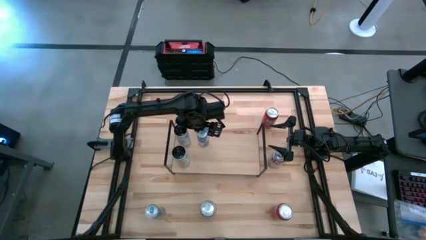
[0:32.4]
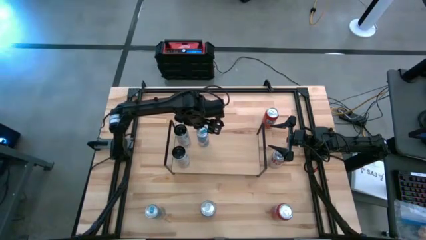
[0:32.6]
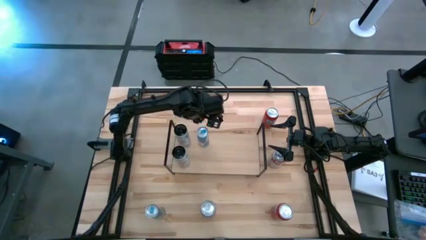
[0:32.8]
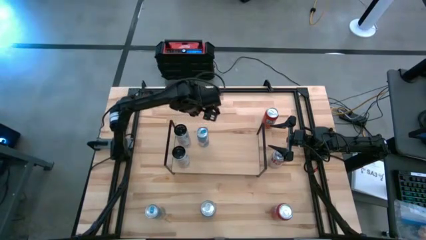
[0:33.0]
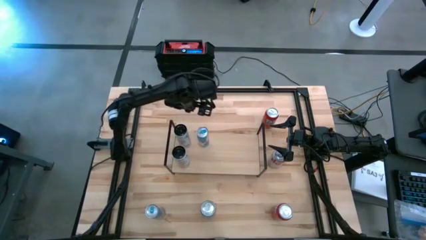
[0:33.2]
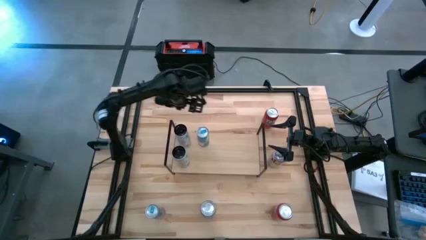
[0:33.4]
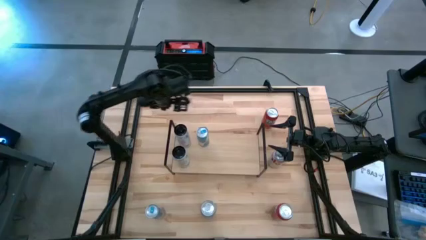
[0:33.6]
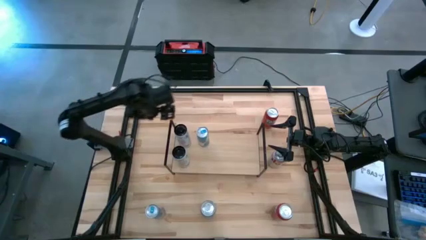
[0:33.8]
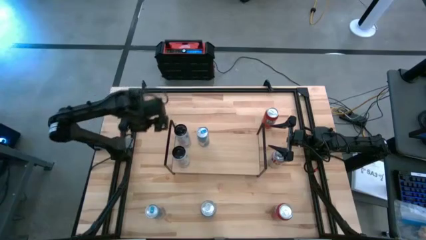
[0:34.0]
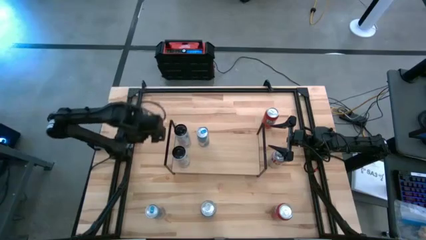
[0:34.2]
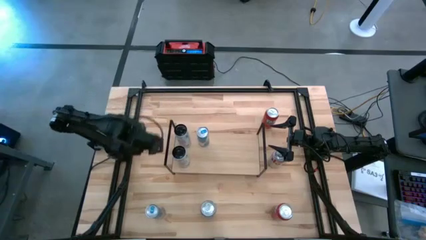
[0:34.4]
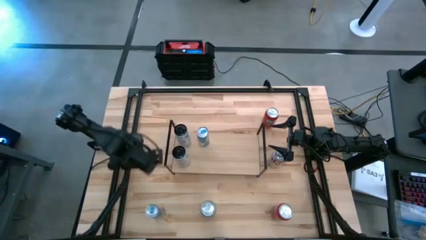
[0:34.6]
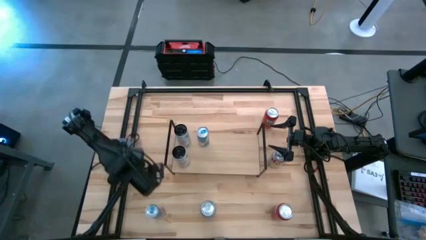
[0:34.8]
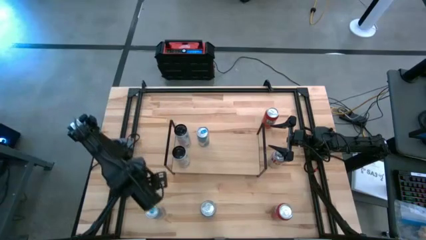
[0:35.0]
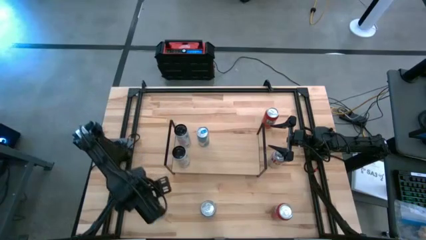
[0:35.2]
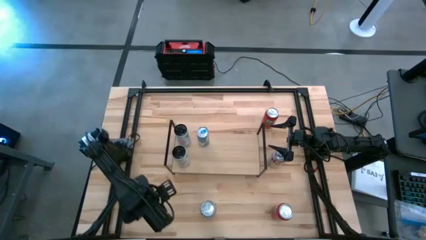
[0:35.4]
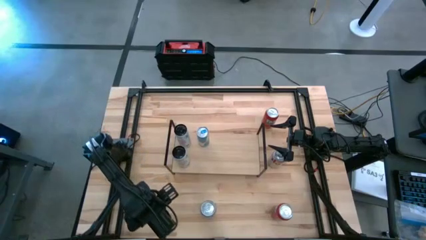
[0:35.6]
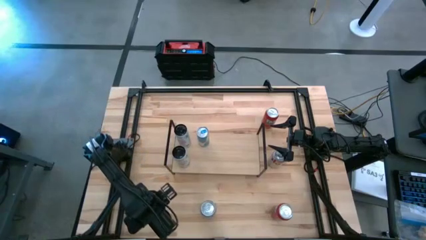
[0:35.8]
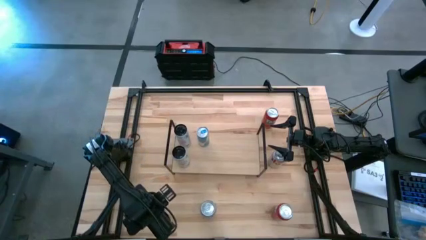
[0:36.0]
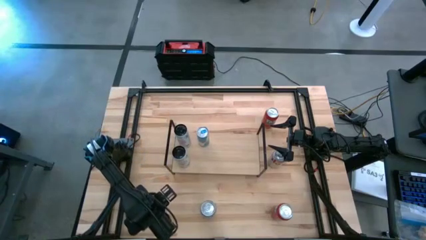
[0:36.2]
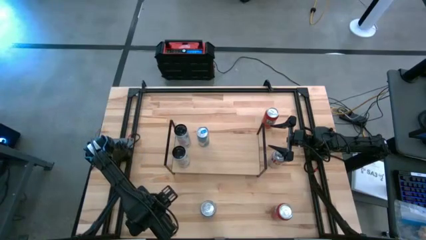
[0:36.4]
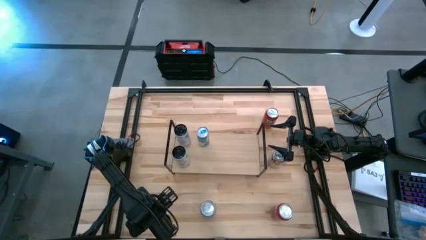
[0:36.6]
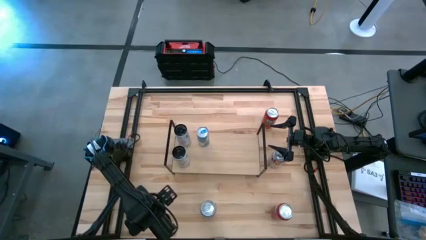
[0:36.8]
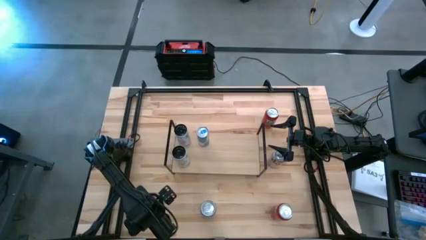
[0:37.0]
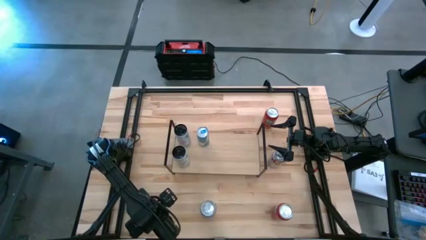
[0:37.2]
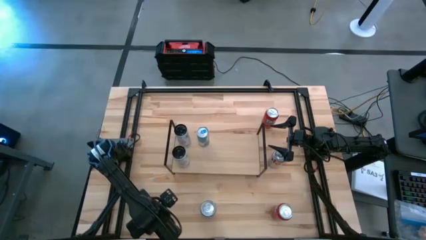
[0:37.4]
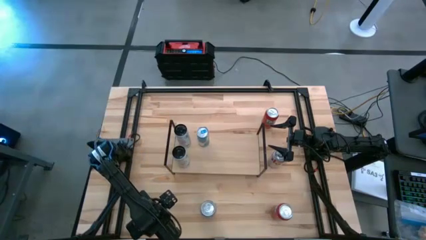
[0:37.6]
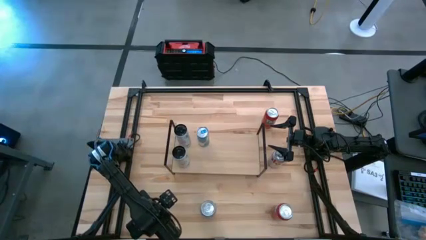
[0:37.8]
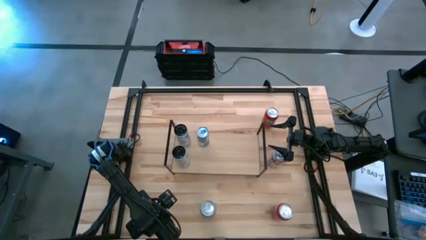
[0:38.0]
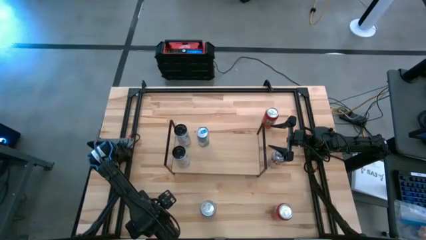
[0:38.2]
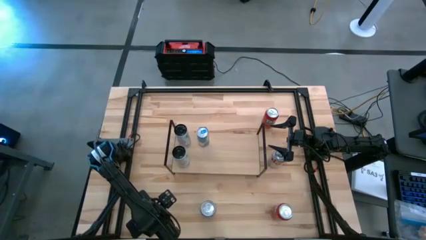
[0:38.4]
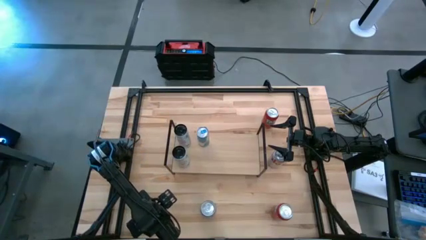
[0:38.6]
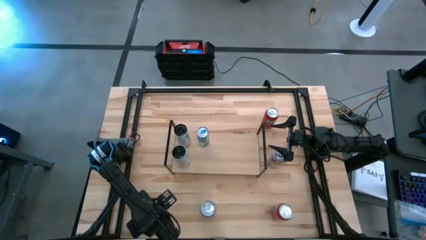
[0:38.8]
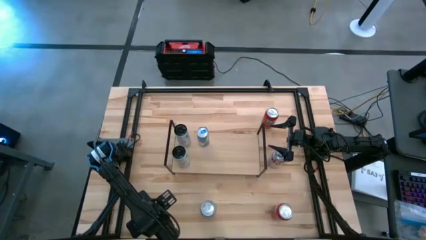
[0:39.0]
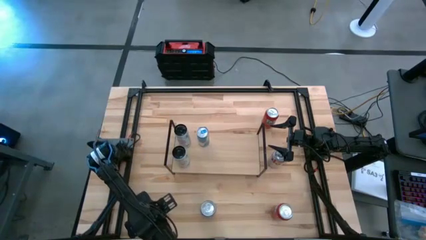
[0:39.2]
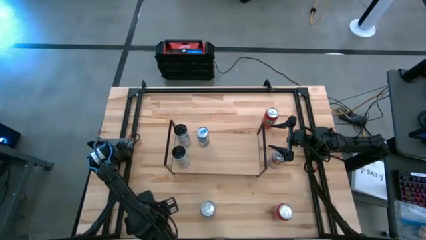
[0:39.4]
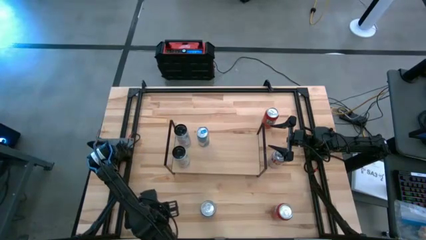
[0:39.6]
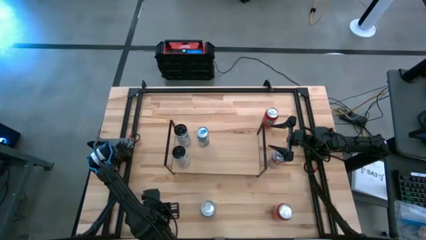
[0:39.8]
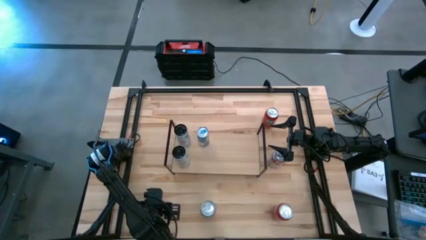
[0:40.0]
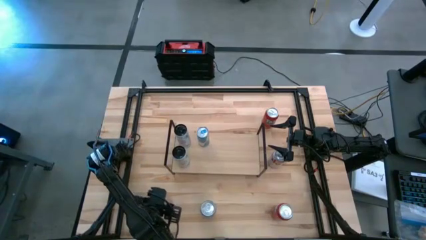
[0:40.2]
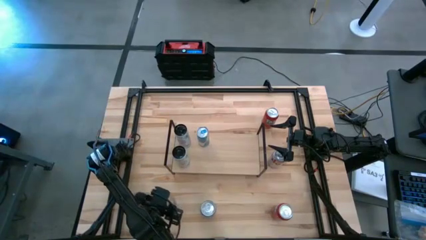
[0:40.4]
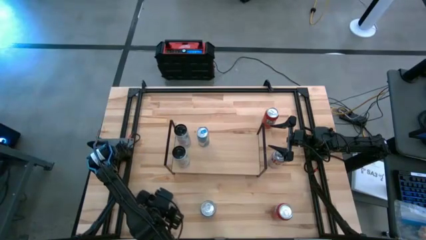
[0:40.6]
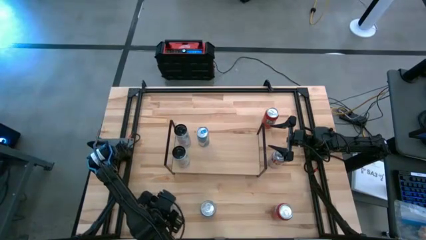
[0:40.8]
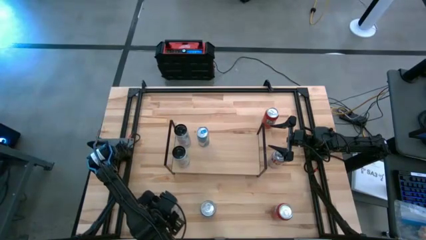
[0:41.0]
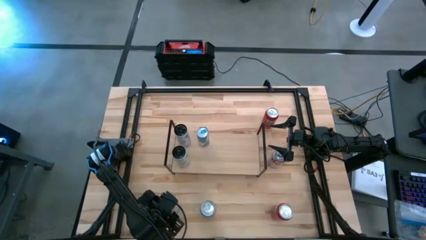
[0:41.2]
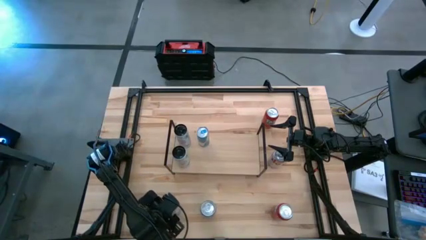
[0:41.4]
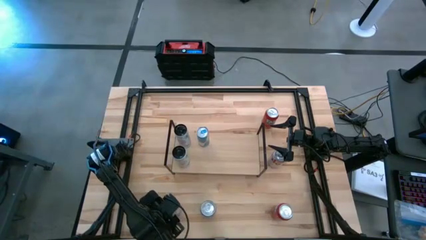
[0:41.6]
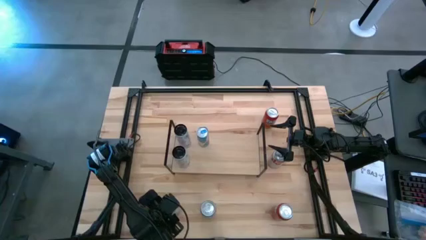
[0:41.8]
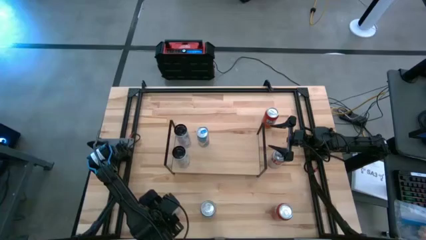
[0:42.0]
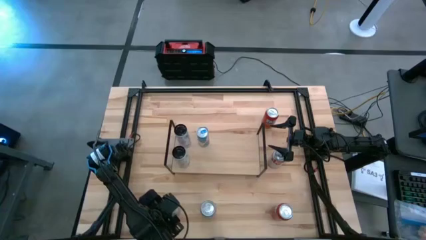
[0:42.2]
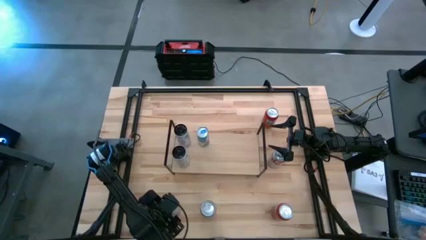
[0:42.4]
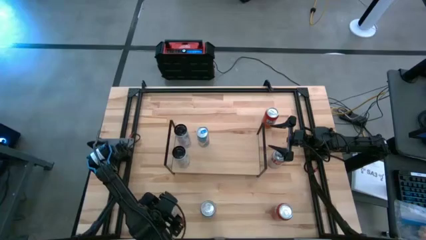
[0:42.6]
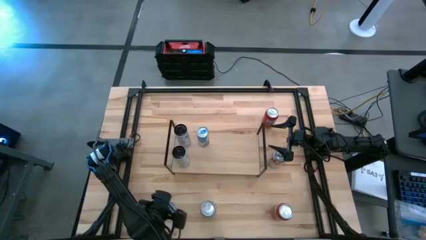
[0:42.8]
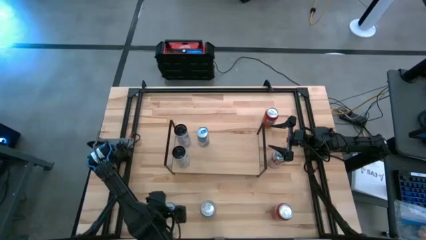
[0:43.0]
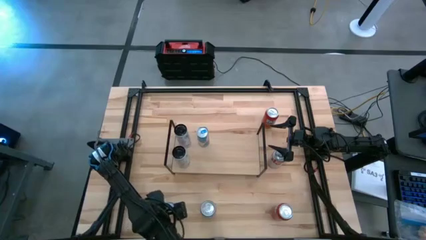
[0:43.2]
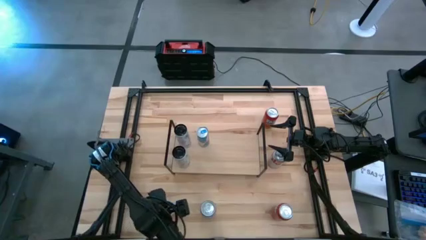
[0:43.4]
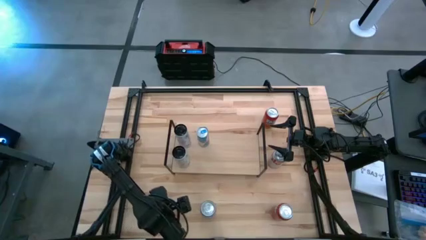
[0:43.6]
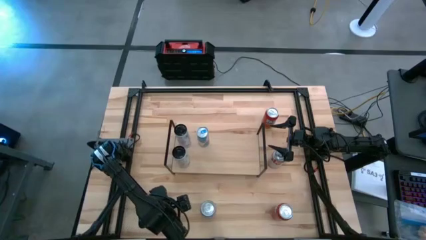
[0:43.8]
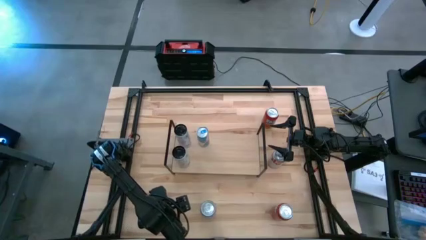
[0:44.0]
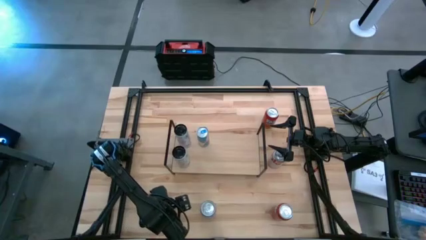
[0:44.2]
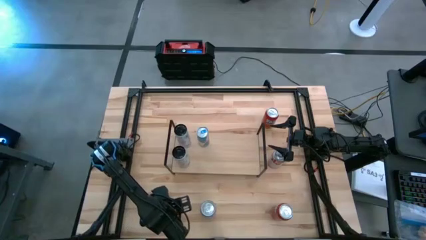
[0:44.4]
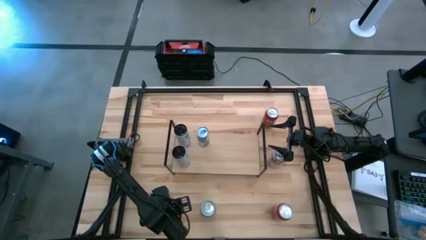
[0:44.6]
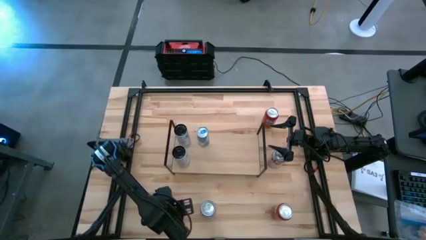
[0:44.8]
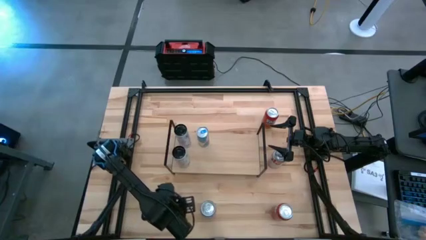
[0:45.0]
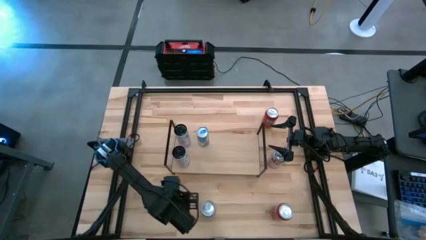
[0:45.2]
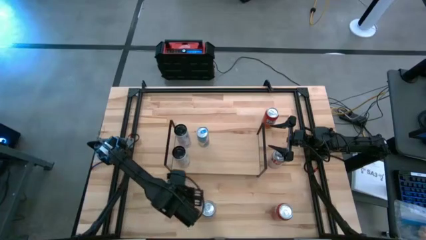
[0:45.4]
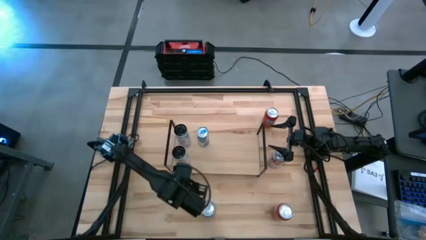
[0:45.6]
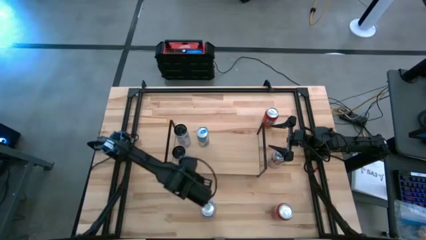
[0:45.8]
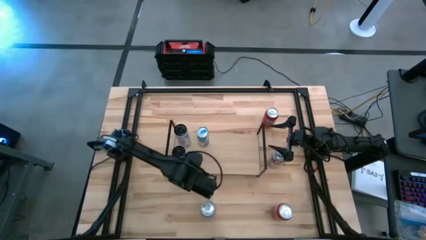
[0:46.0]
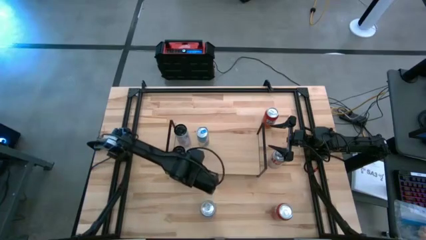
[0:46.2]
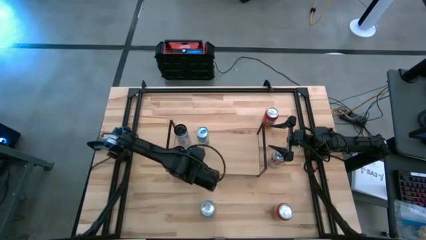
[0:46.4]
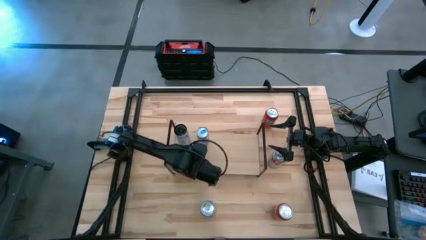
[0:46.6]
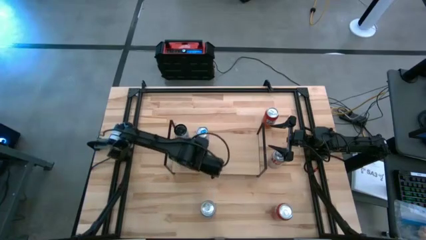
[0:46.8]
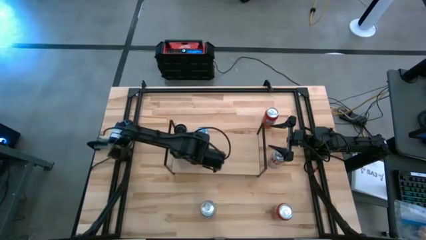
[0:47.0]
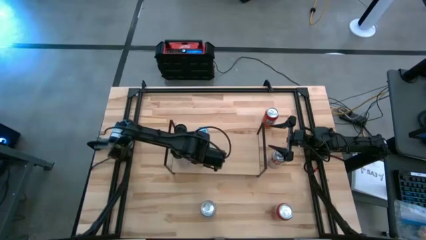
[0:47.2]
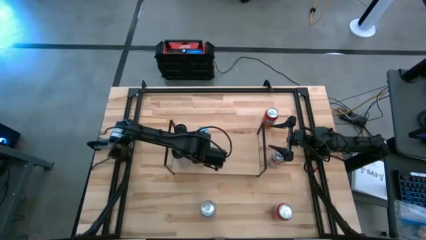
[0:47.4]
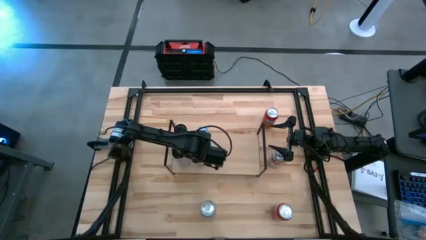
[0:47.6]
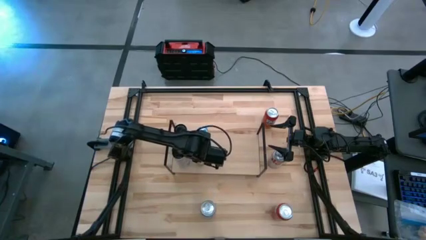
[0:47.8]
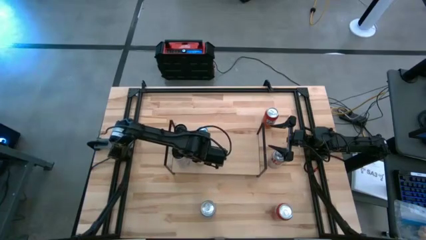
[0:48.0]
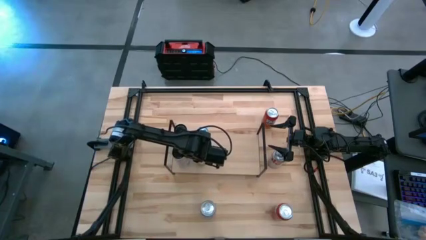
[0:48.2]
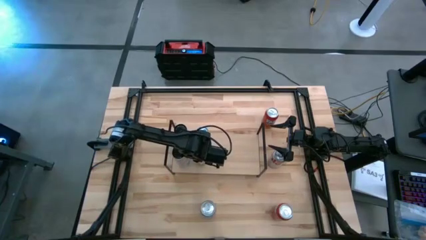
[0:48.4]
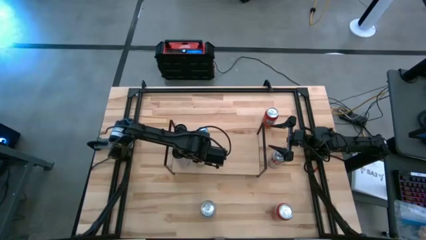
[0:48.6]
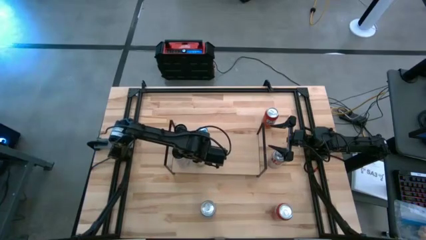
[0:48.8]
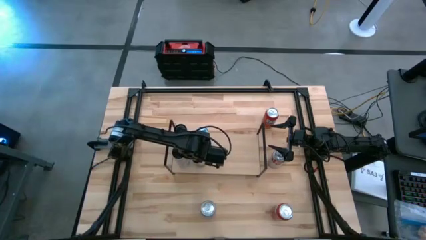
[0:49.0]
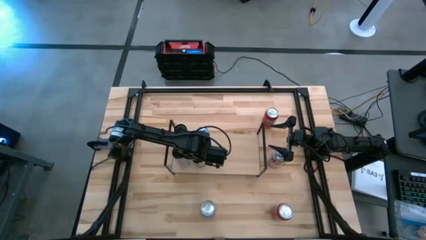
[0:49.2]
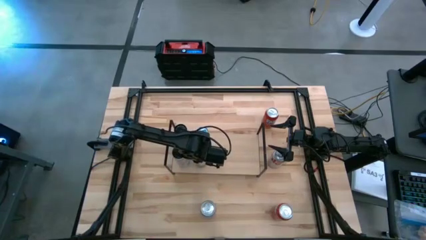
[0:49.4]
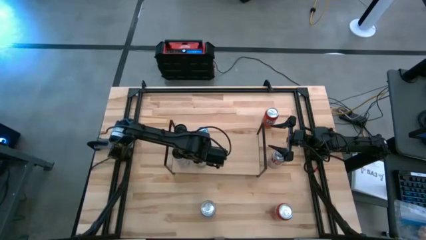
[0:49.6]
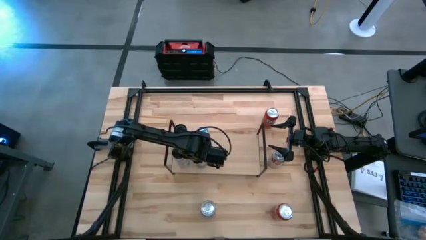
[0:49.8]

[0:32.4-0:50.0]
Task: Place canned beverage on shelf
Put the blue soda can on the shelf aligned with the blue soda can
